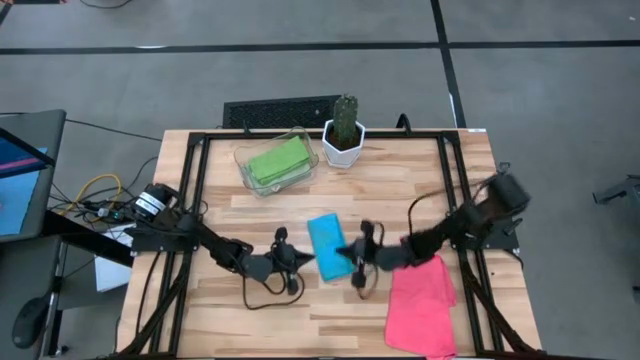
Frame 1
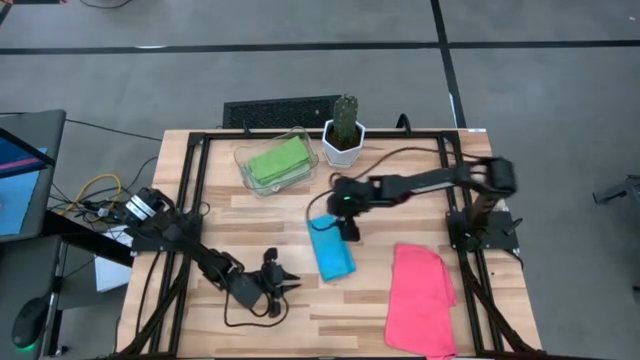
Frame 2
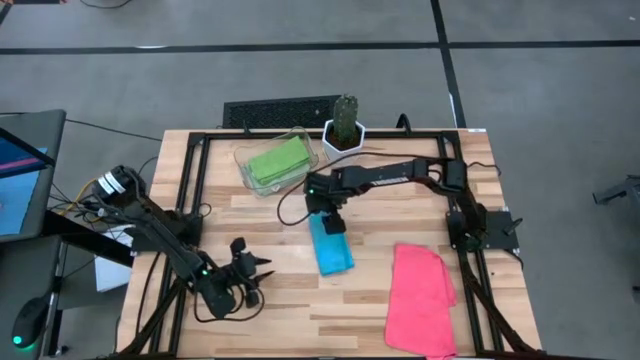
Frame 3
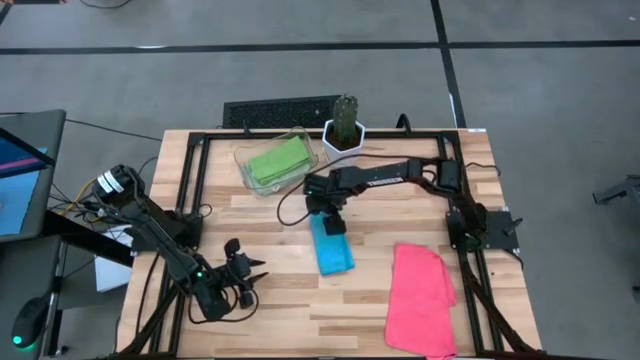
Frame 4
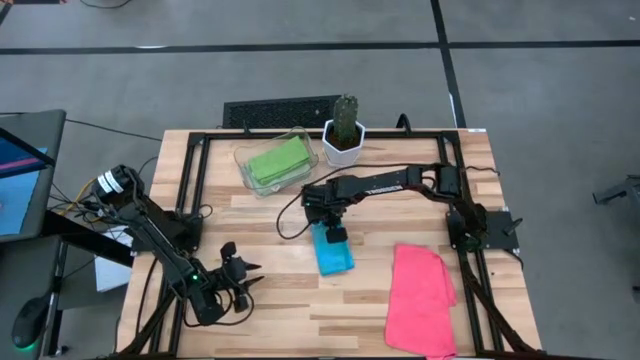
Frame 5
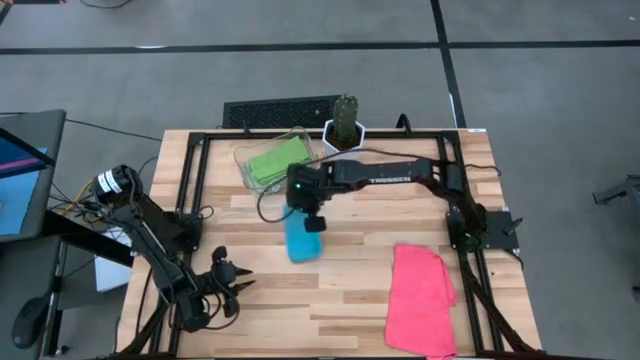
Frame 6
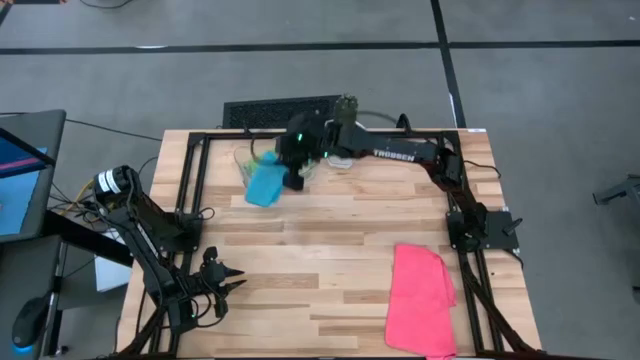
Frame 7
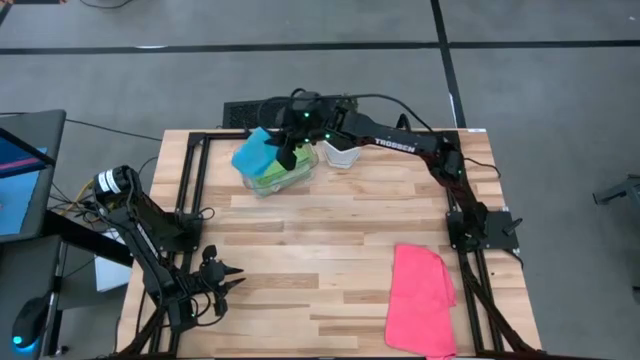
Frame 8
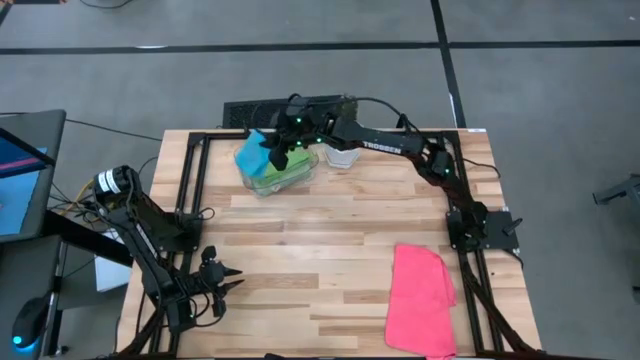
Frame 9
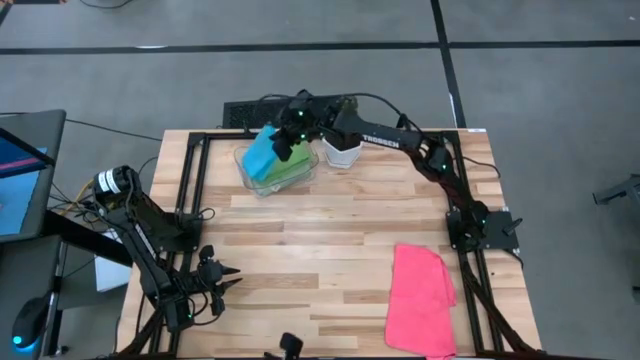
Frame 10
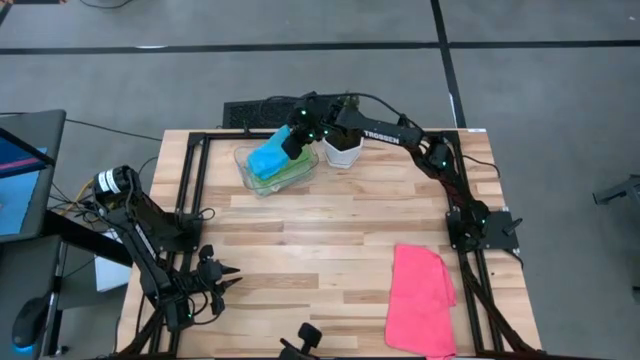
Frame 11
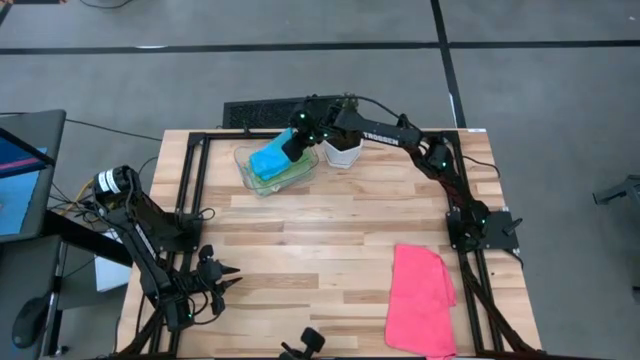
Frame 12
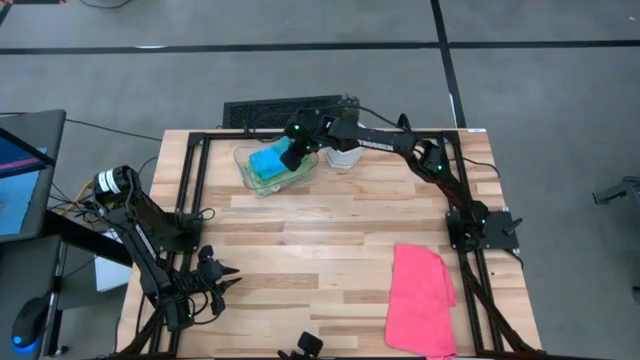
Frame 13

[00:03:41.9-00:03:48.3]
Task: Fold microfiber towels
Put the blue microfiber towel into the transparent bin

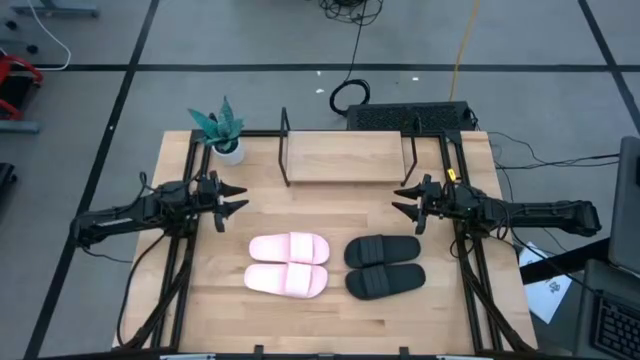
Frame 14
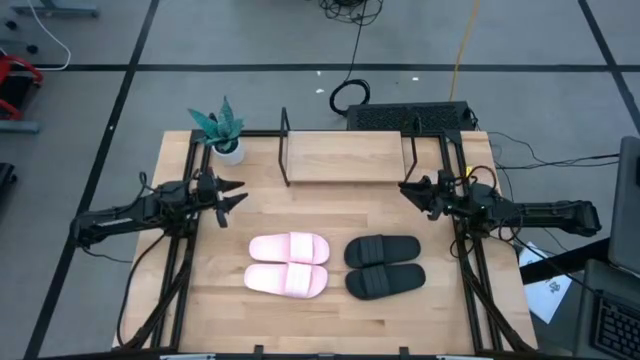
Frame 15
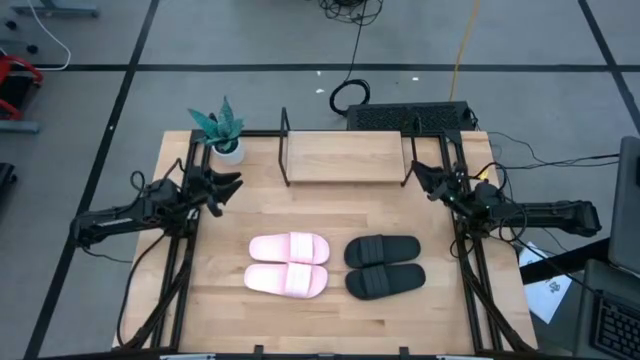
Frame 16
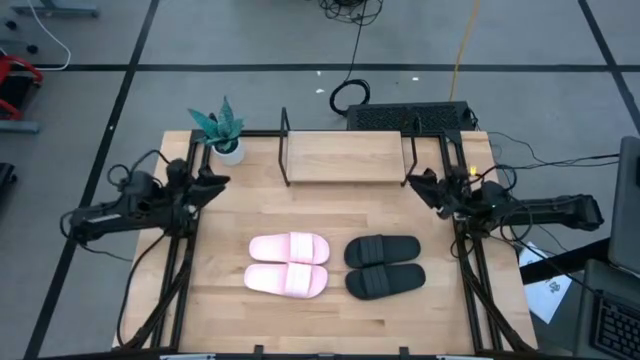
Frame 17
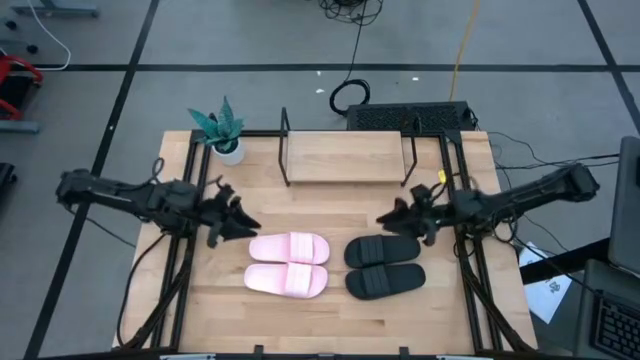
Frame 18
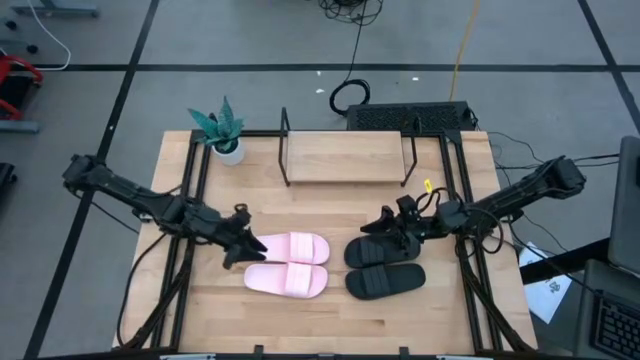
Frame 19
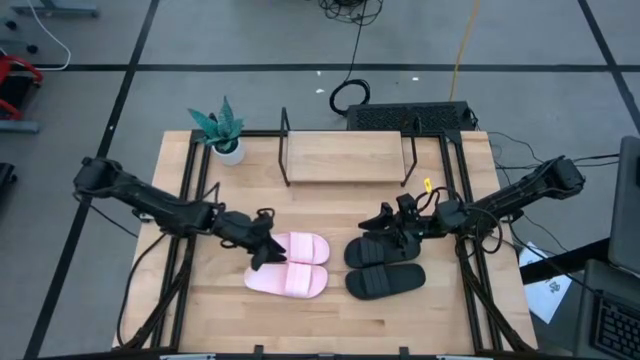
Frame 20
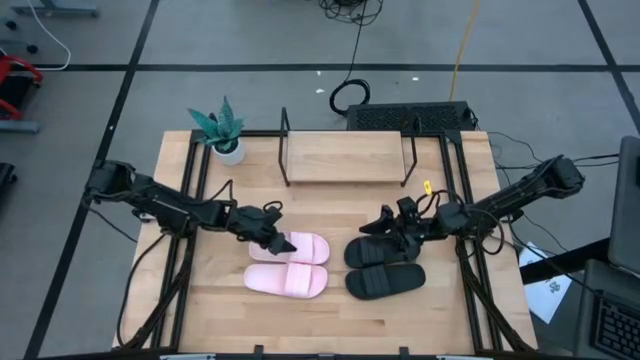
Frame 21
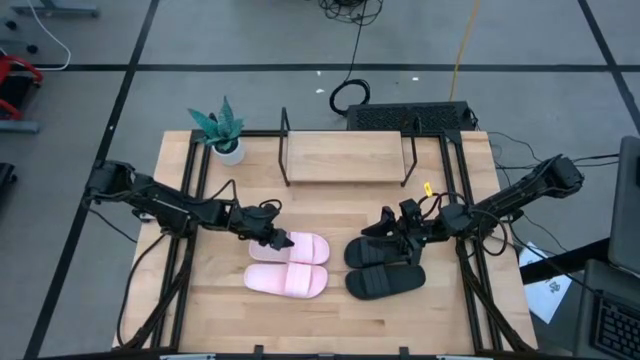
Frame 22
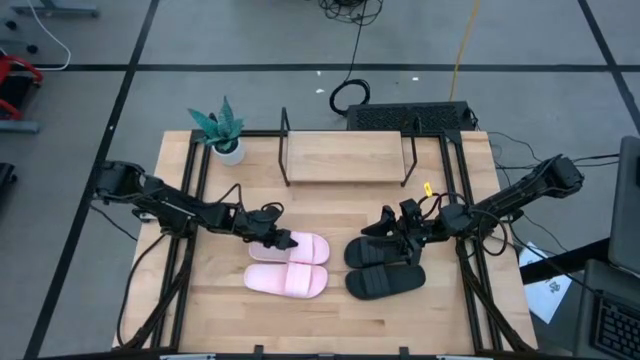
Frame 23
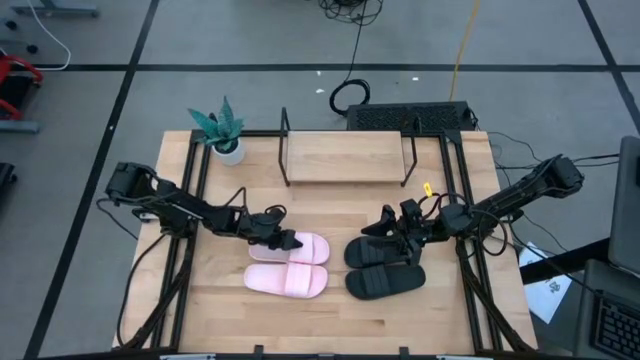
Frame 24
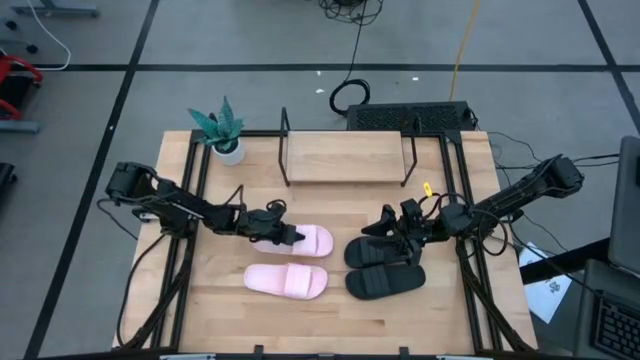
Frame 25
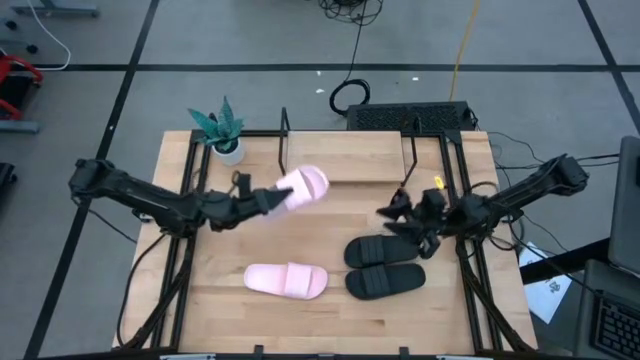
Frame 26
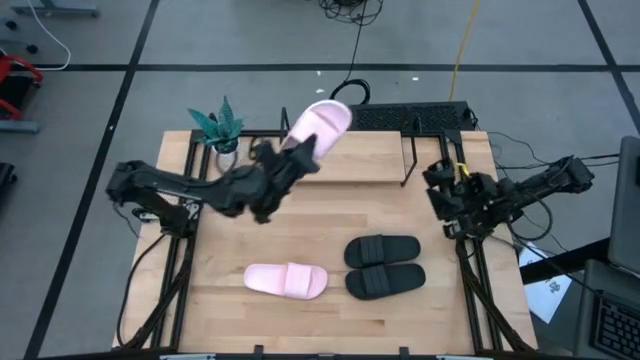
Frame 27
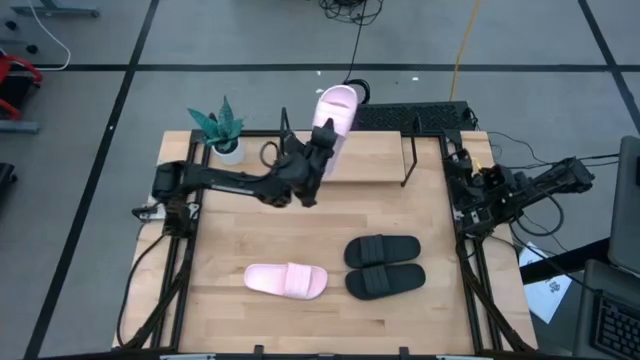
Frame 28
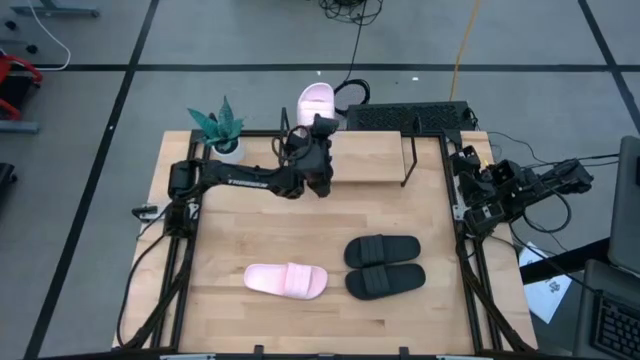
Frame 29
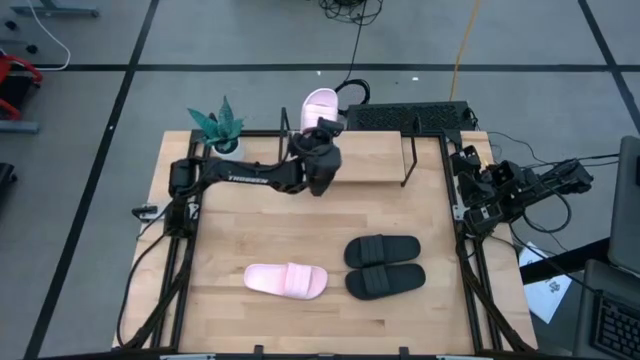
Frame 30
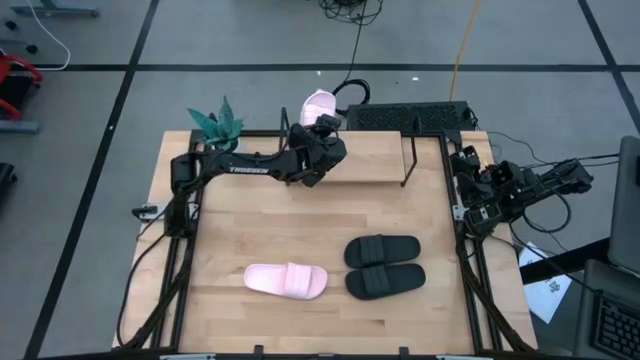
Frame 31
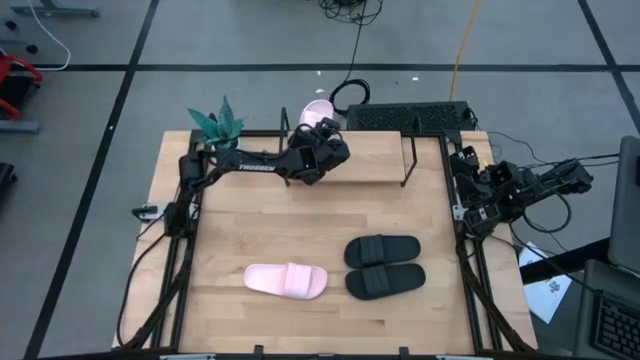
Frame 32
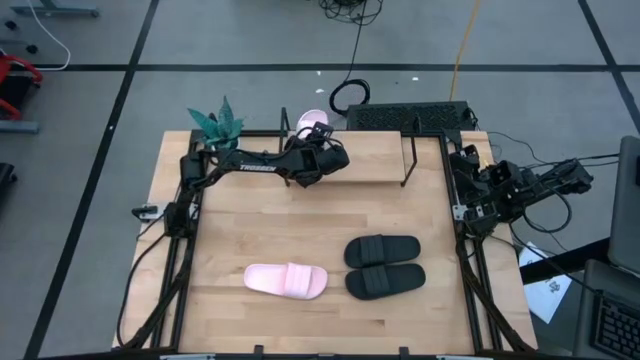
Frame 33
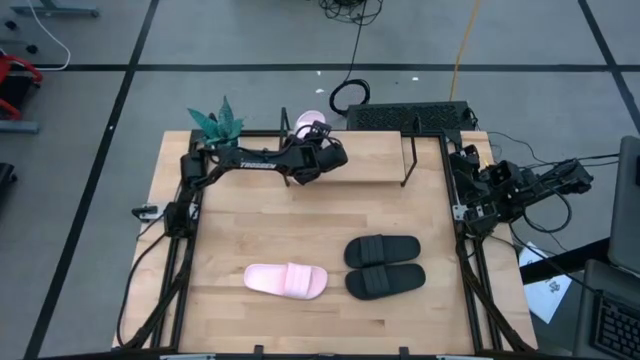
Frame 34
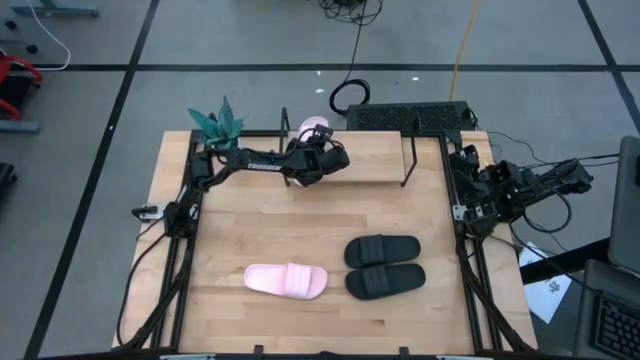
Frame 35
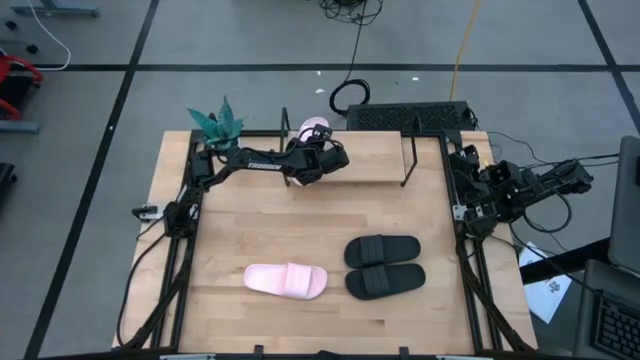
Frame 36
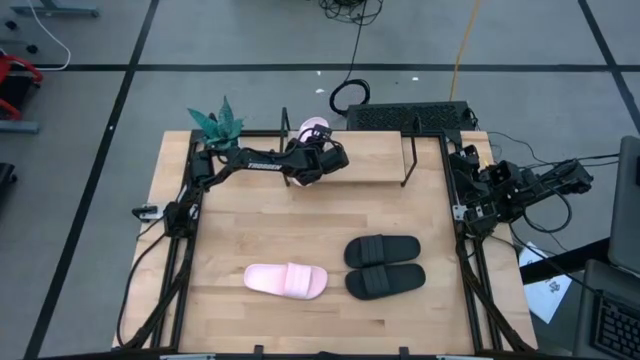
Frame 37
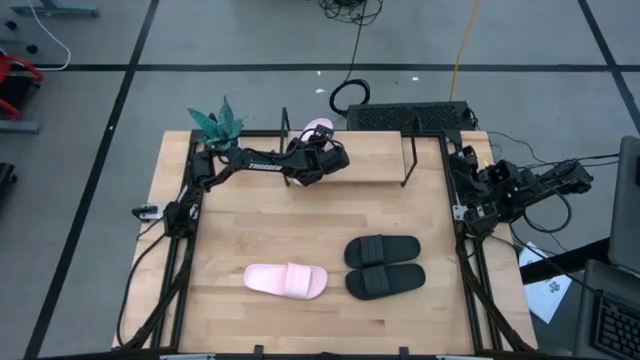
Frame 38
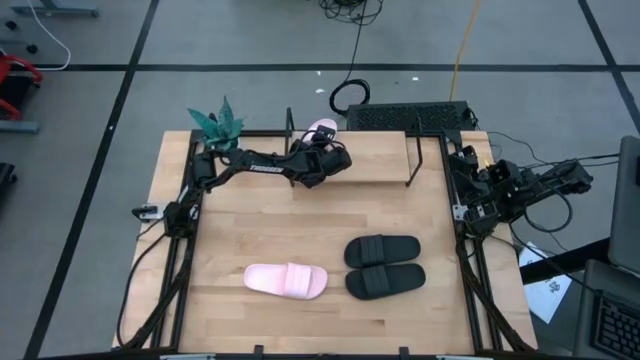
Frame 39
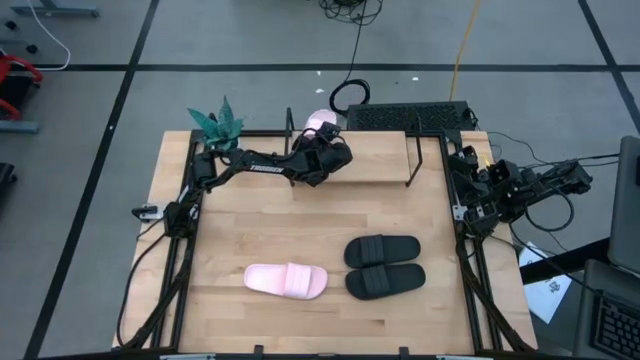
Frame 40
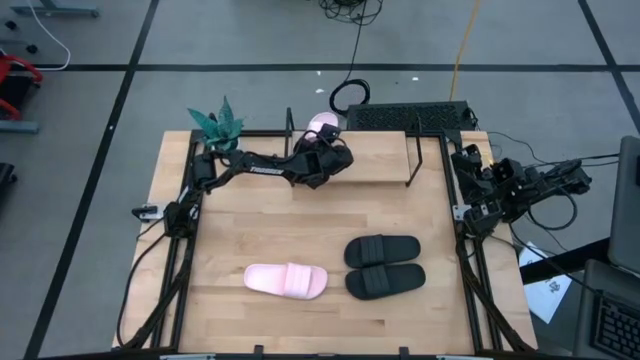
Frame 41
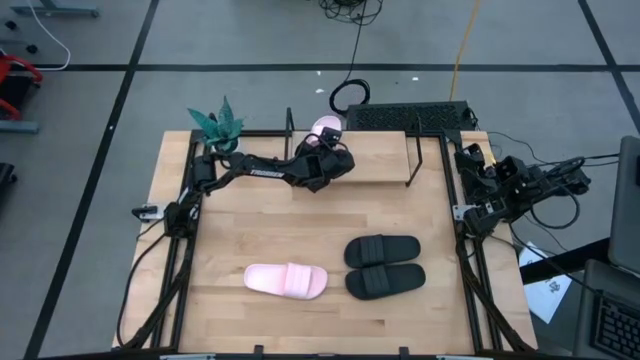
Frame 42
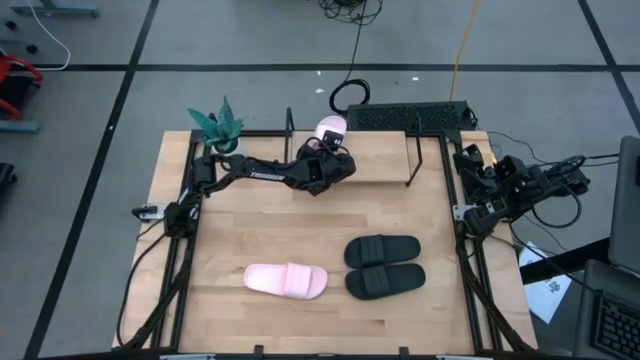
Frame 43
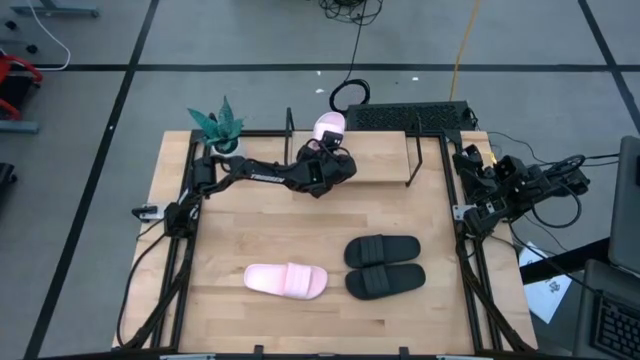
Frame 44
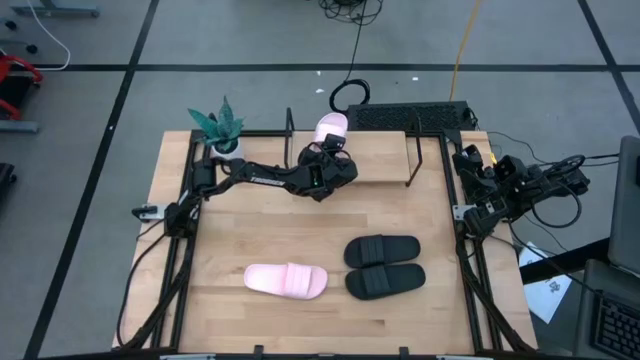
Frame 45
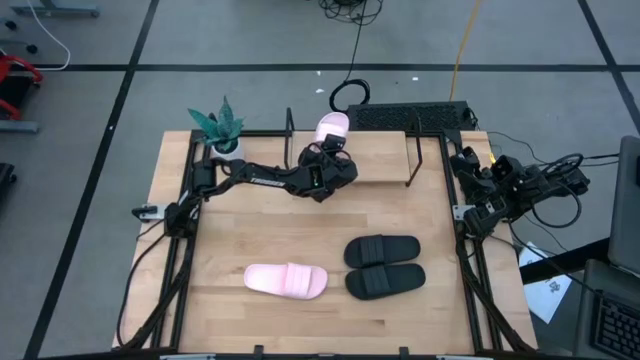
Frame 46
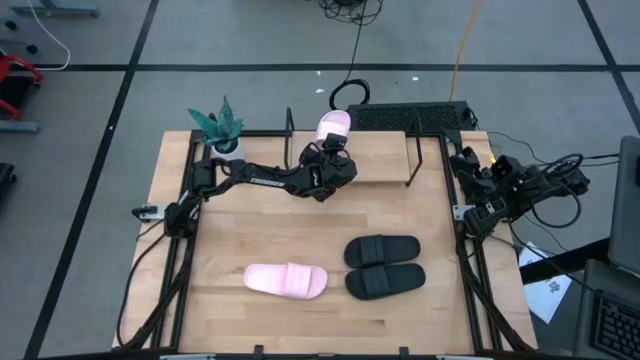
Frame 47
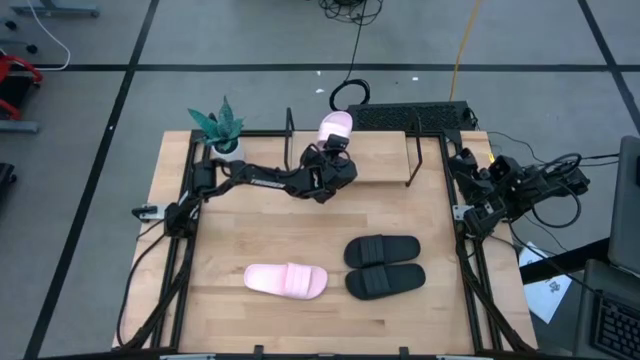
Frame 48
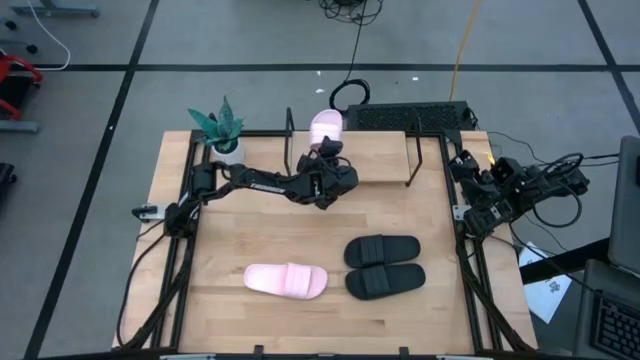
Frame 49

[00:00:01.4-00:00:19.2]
Task: Pick and place slides into the shelf
Put the top pink slide on the shelf
